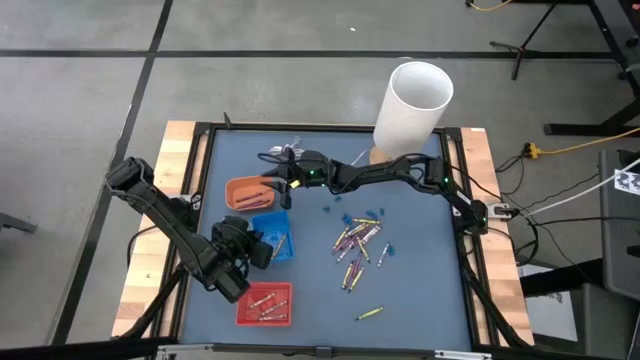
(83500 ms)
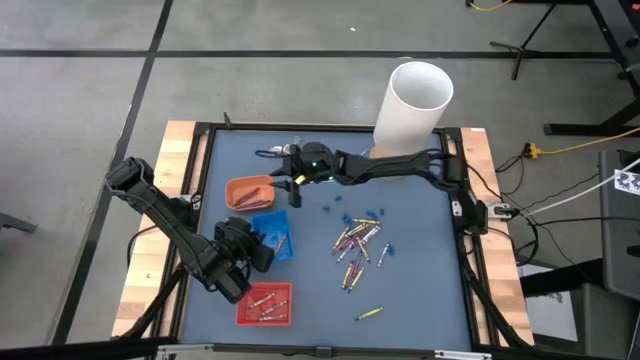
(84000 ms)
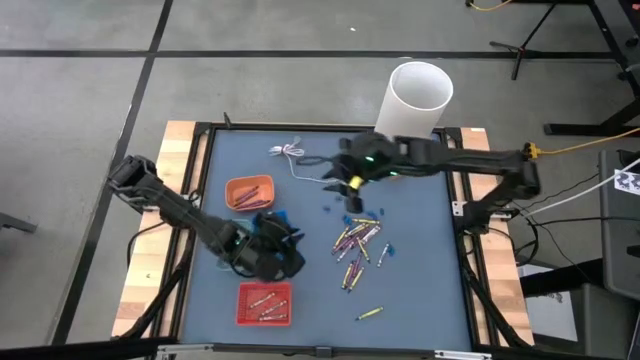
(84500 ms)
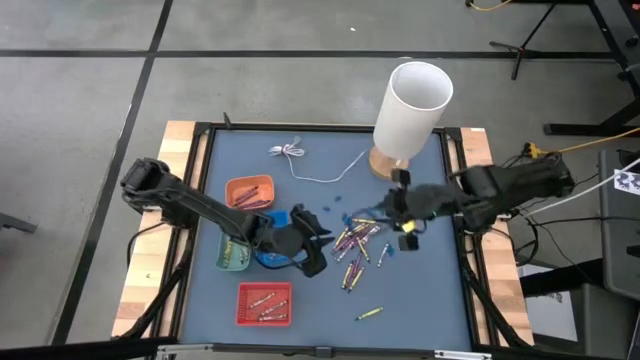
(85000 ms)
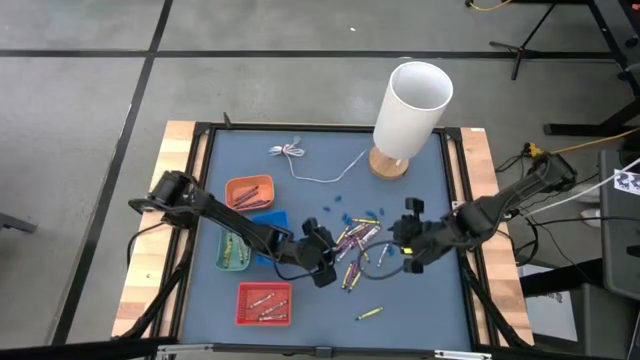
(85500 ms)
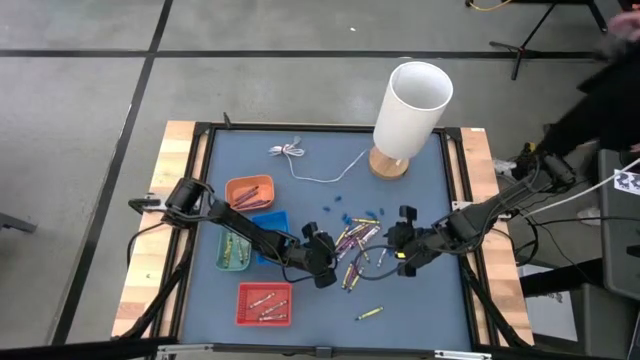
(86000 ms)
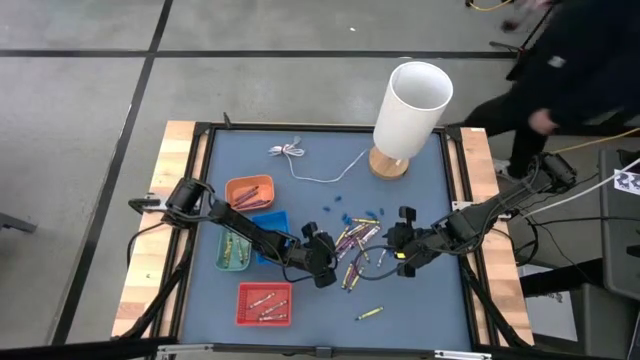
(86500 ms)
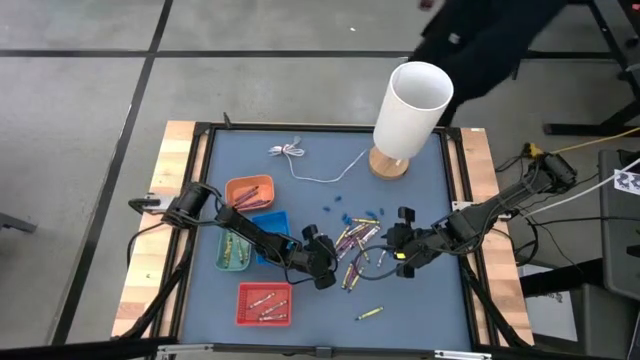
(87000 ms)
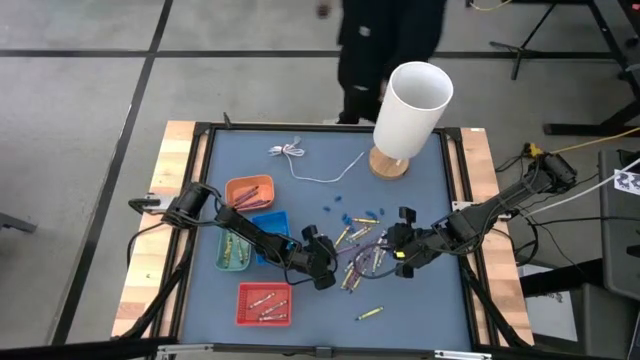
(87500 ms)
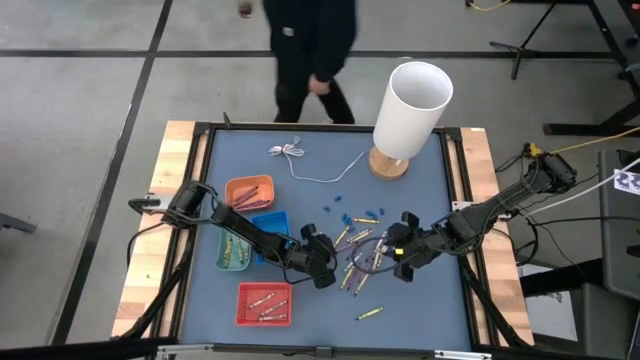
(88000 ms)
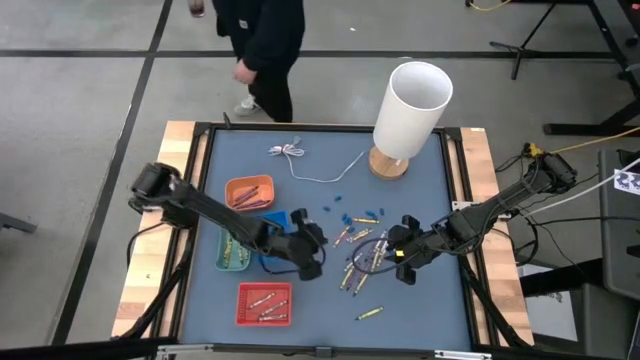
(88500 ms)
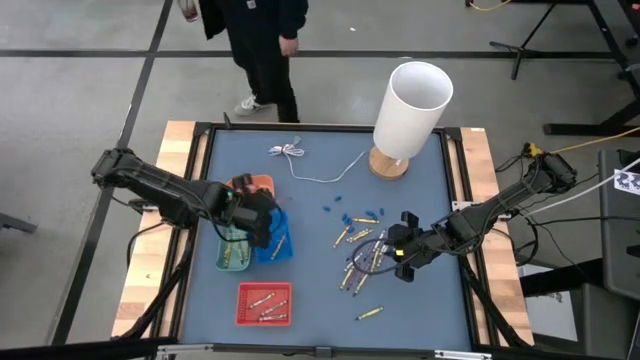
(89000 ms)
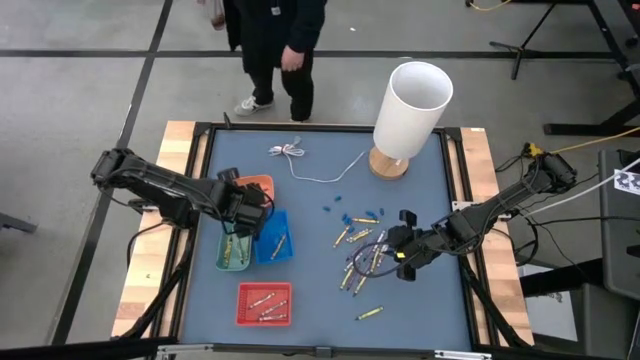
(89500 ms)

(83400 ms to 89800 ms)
Task: Sort crayons
Put the violet crayon into the orange bin

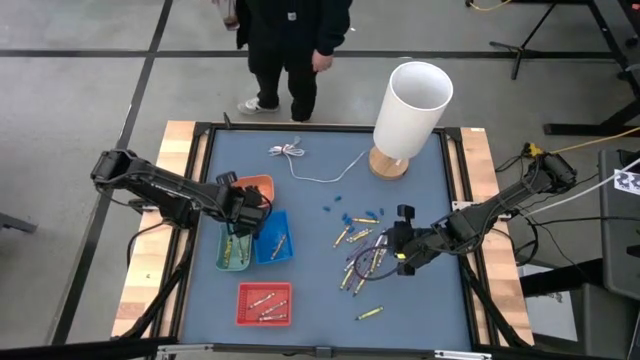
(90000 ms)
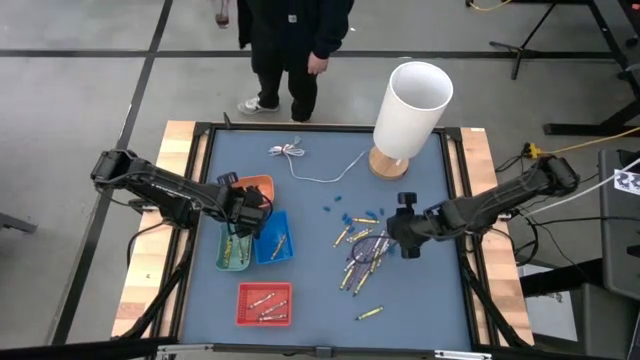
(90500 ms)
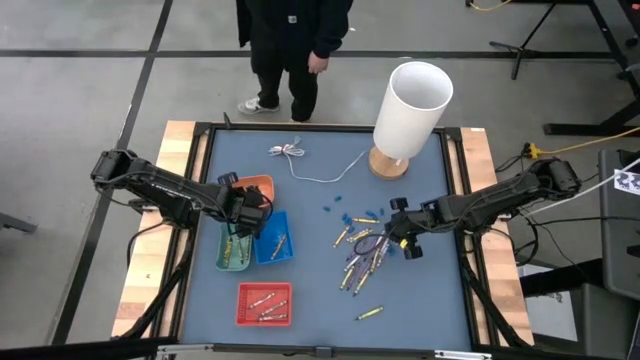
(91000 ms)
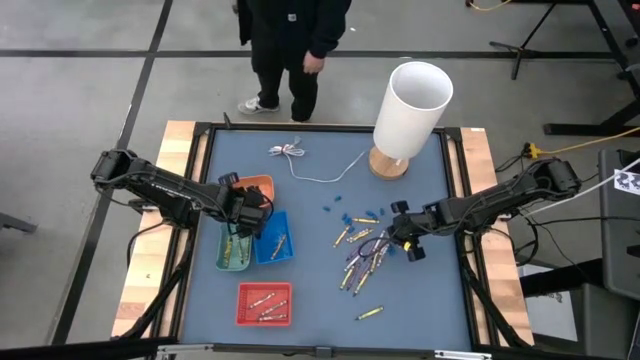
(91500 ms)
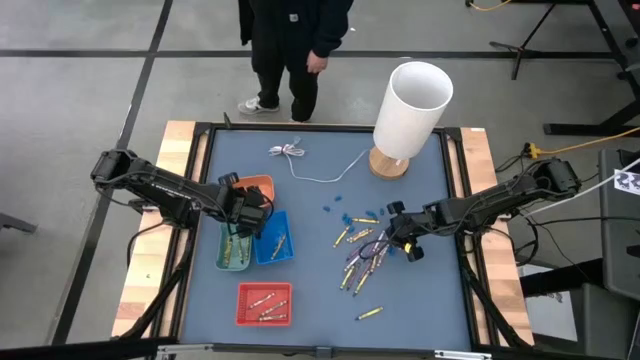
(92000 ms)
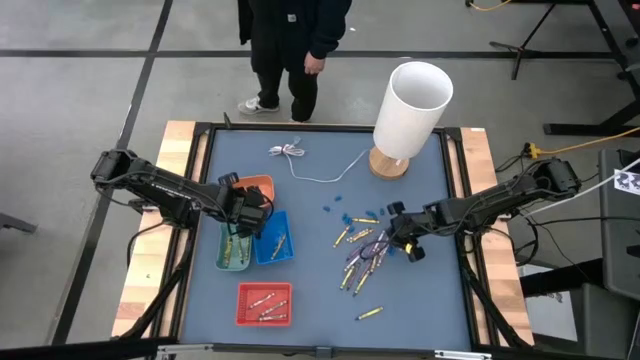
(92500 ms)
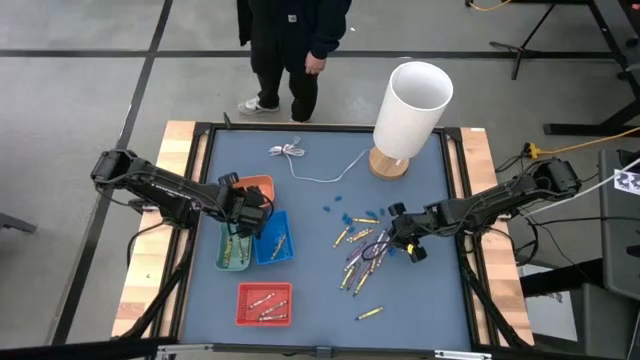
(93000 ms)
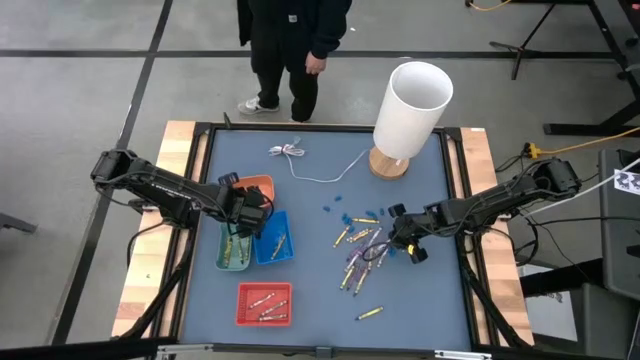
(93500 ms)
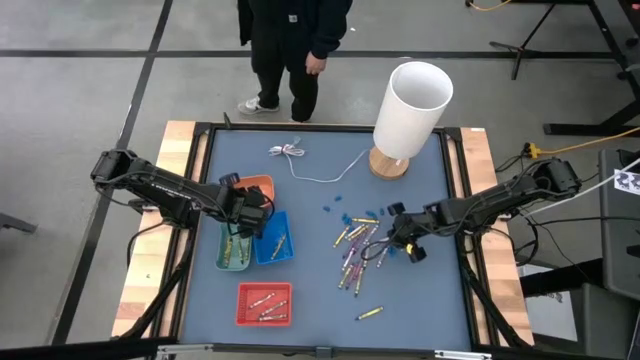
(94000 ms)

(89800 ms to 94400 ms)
Put the gray crayon into the orange basket

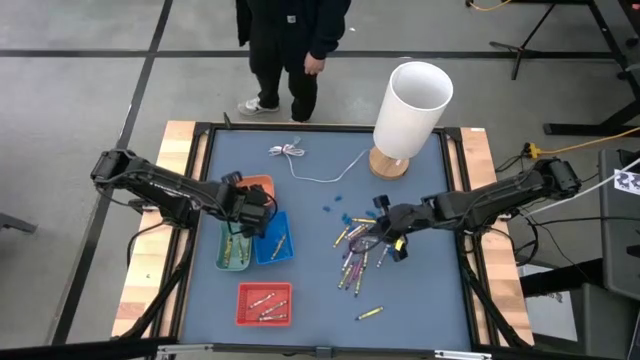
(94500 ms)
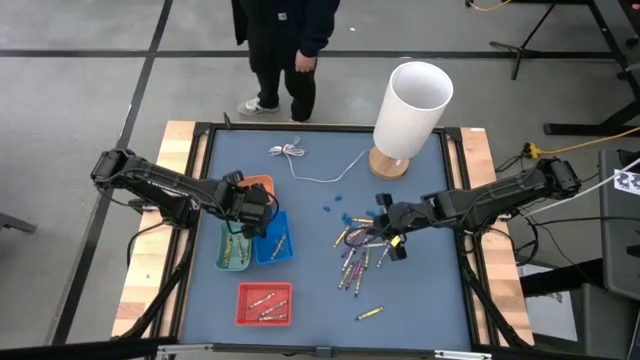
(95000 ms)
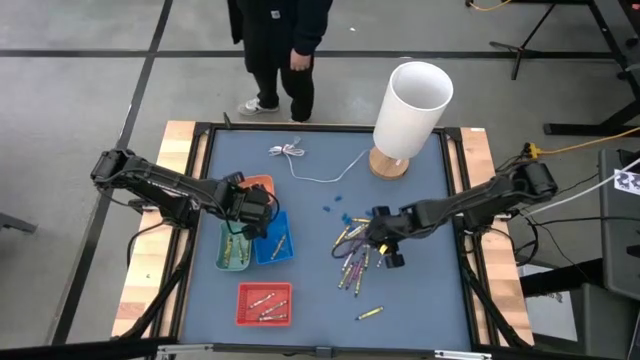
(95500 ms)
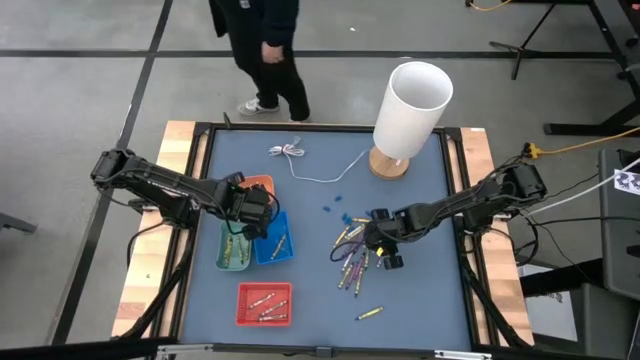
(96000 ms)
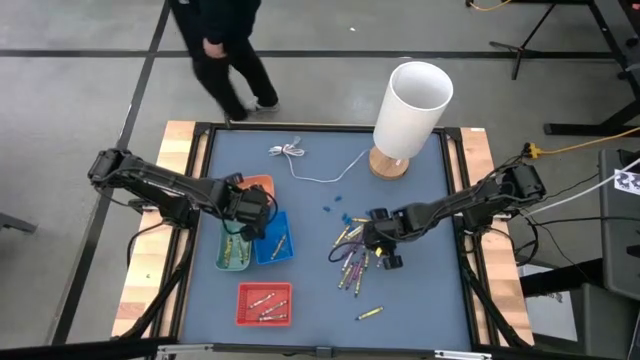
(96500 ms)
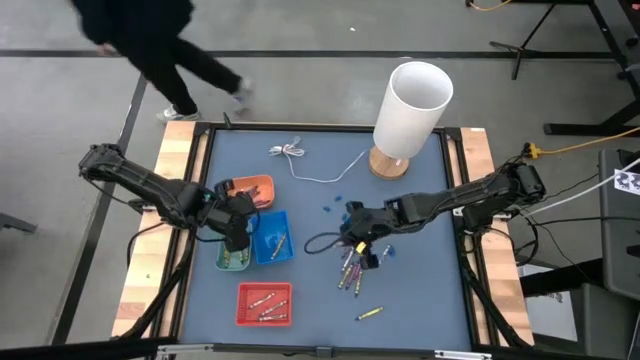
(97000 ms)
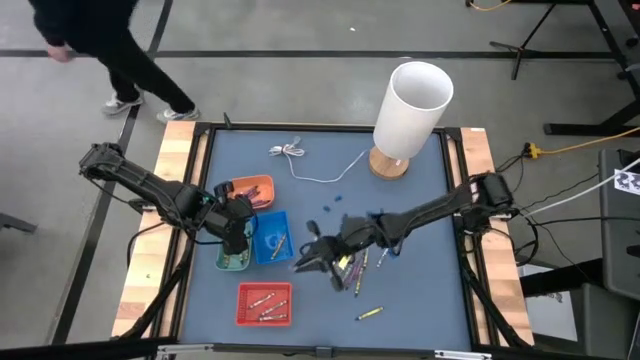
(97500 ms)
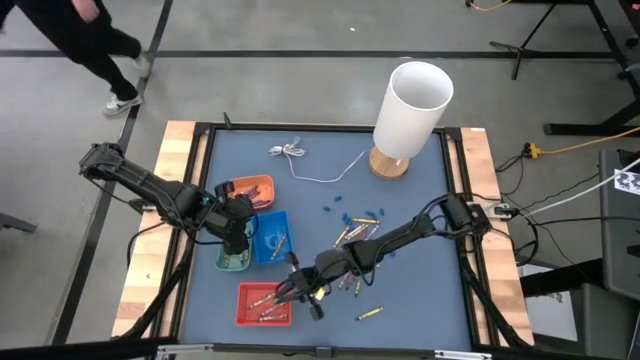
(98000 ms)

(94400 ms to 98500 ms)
Put the gray crayon into the orange basket

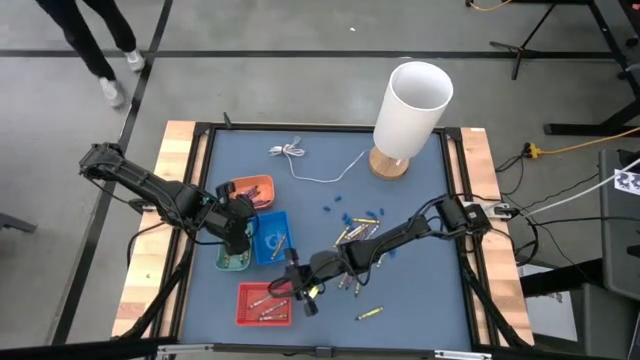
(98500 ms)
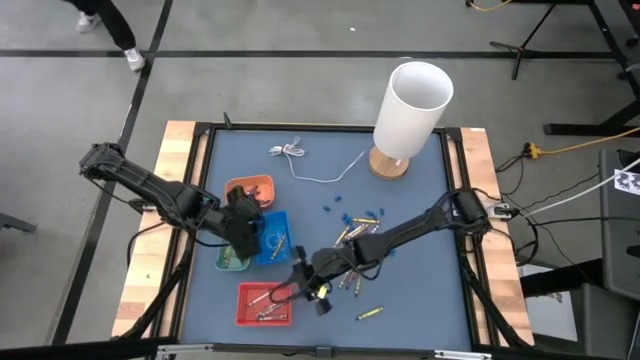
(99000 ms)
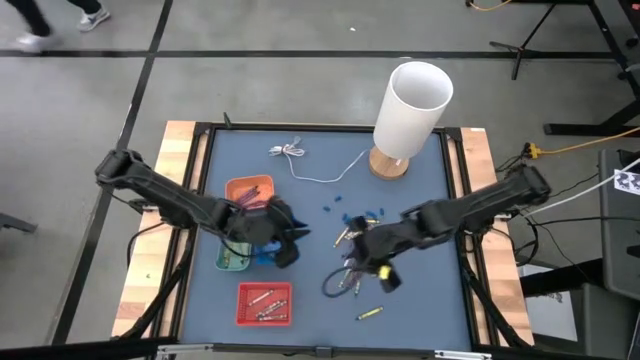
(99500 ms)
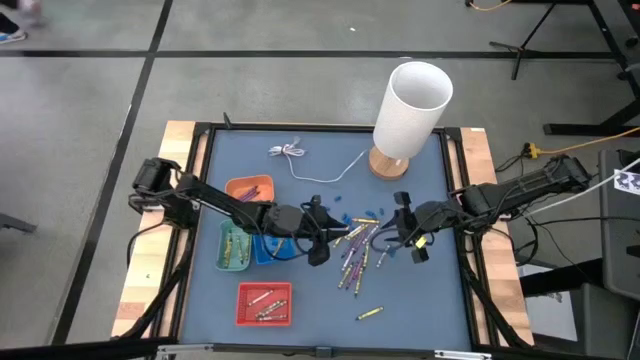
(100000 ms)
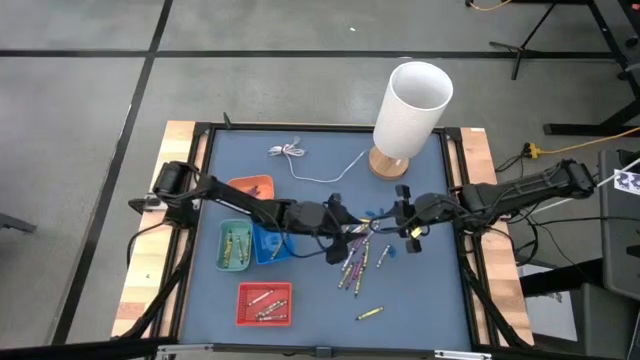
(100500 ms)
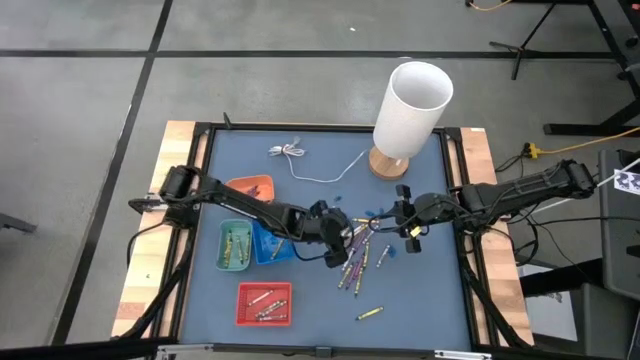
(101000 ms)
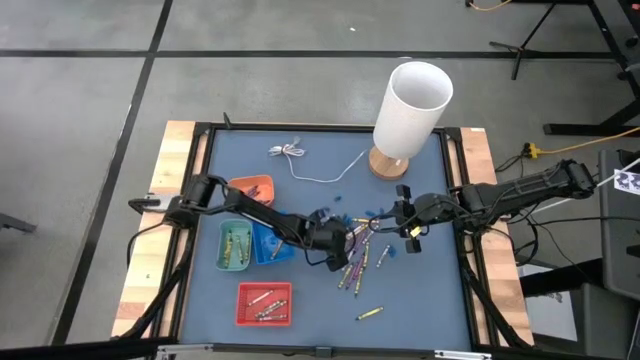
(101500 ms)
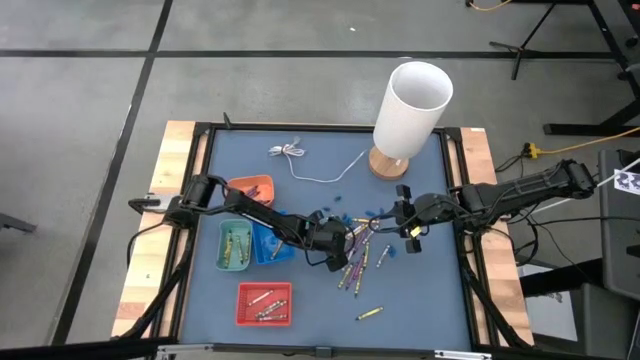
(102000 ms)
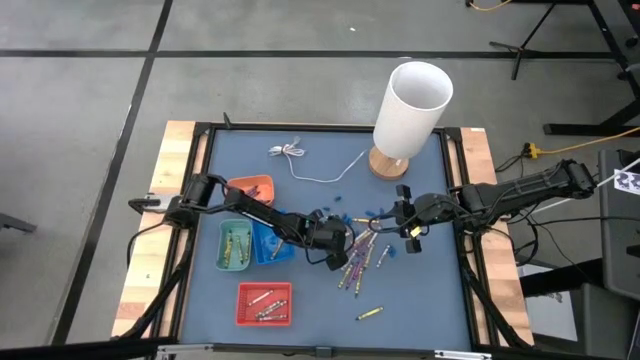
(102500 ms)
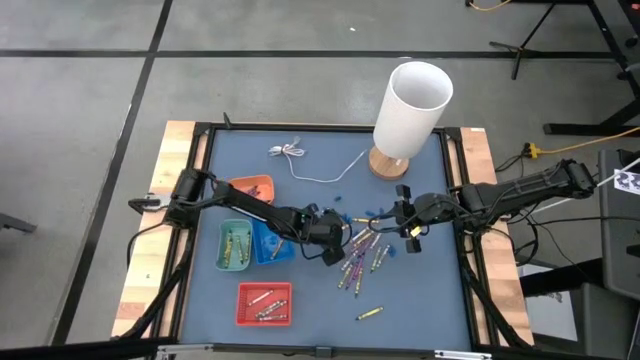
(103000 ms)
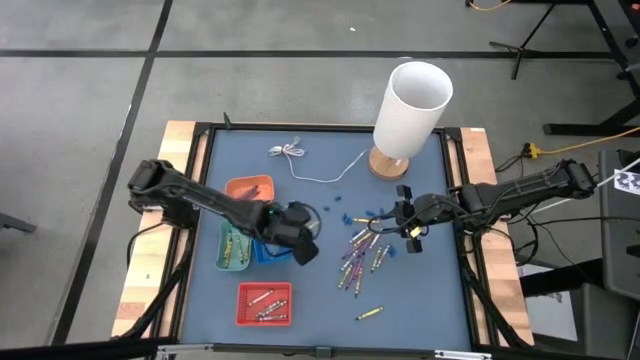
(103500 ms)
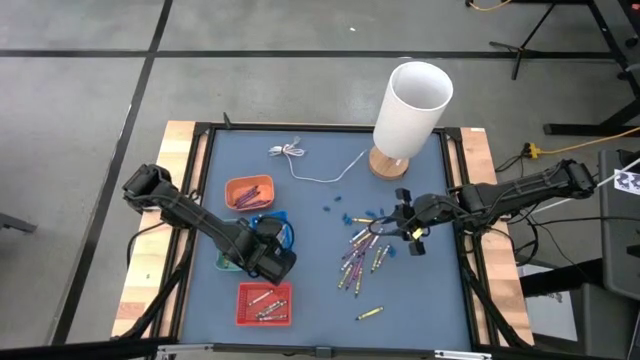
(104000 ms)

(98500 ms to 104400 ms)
Put the yellow crayon into the blue basket
